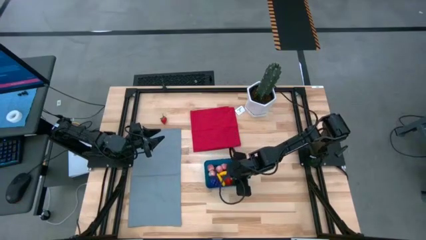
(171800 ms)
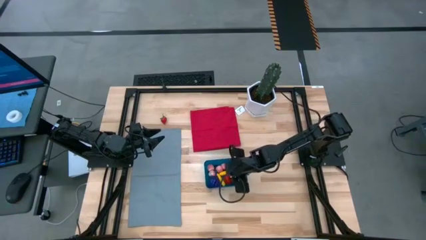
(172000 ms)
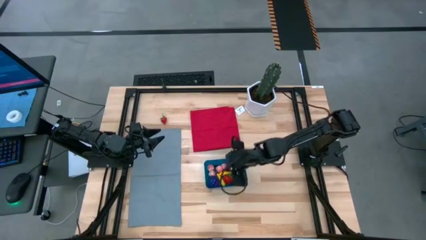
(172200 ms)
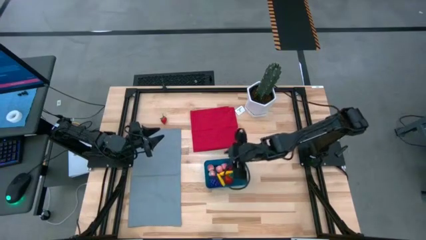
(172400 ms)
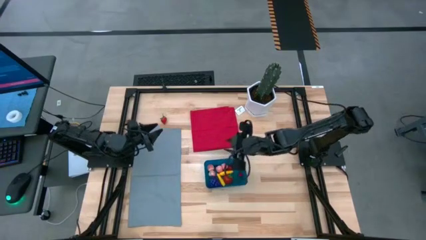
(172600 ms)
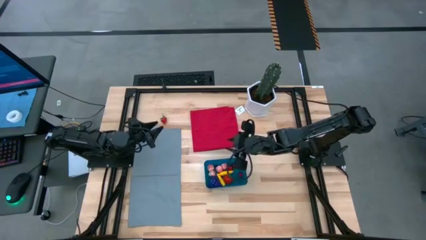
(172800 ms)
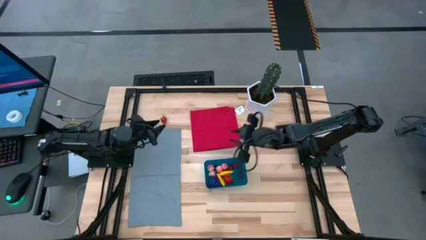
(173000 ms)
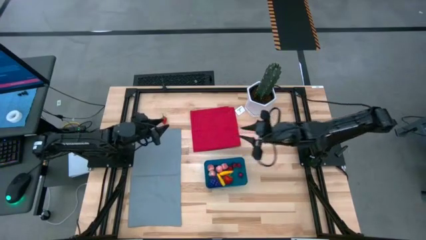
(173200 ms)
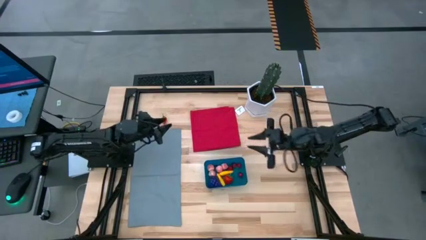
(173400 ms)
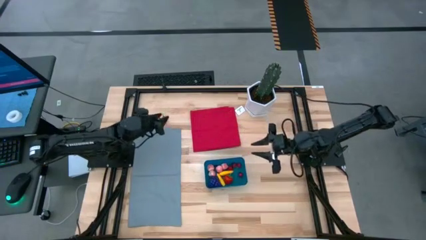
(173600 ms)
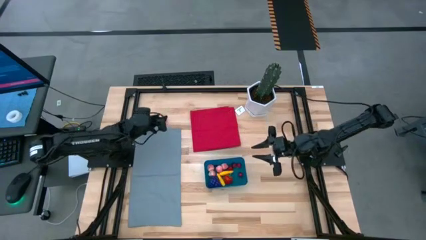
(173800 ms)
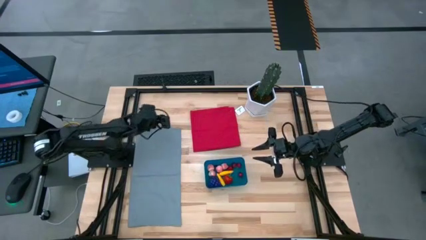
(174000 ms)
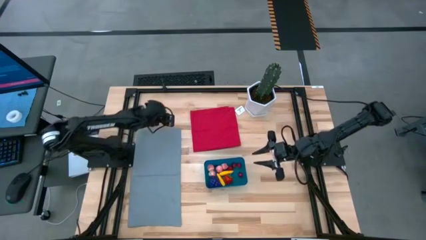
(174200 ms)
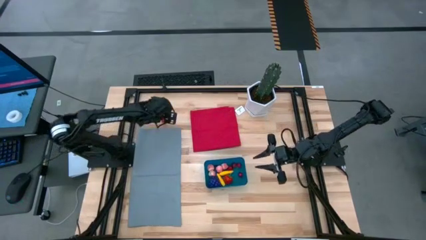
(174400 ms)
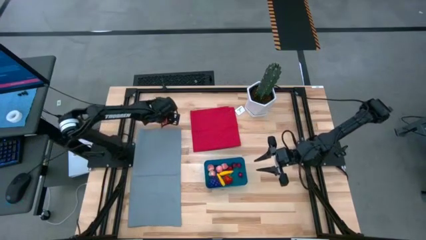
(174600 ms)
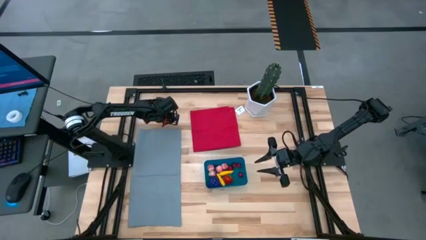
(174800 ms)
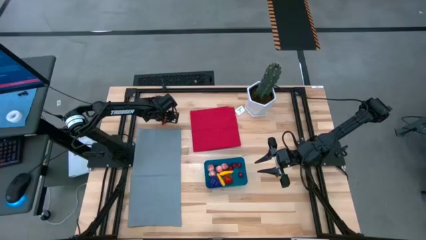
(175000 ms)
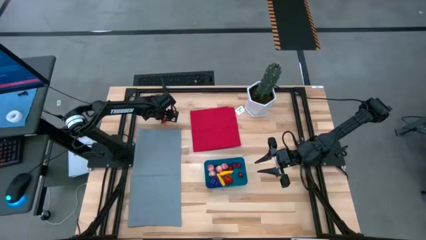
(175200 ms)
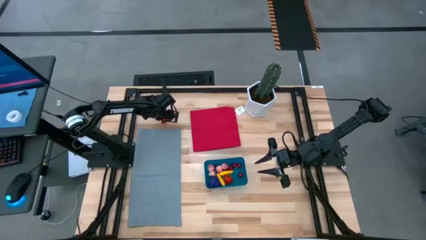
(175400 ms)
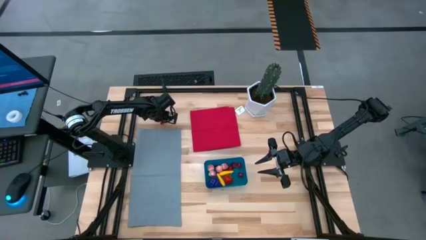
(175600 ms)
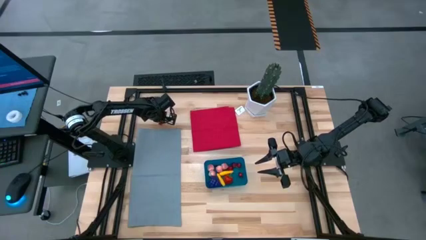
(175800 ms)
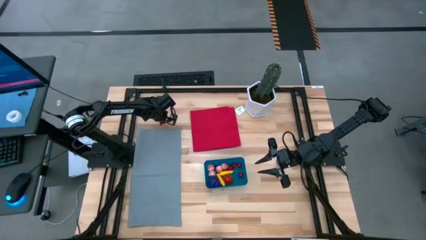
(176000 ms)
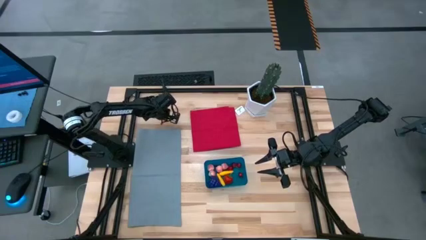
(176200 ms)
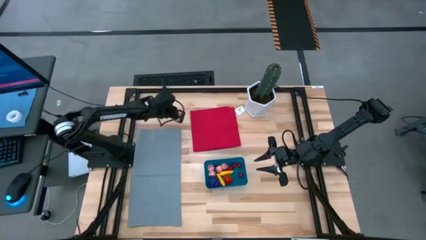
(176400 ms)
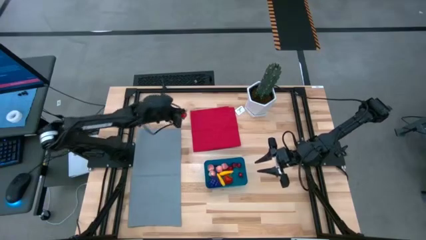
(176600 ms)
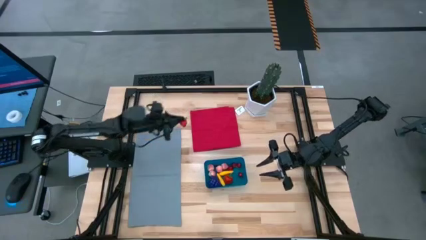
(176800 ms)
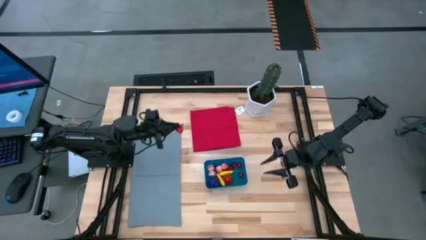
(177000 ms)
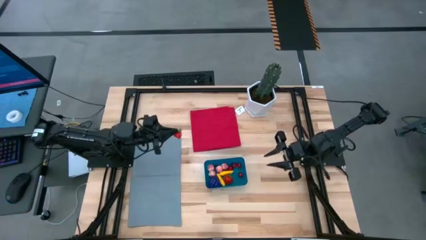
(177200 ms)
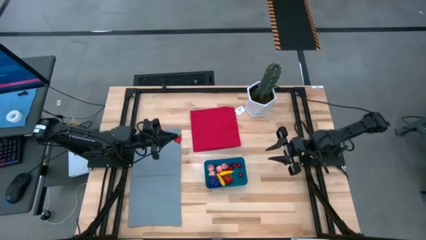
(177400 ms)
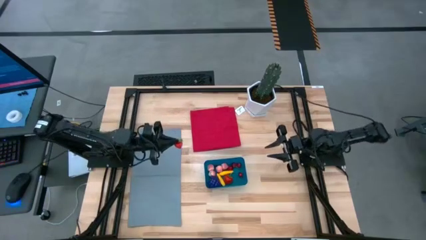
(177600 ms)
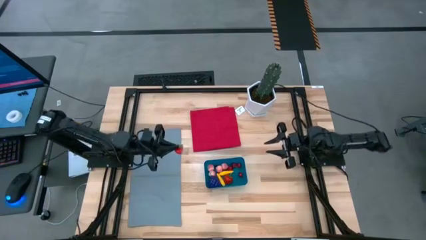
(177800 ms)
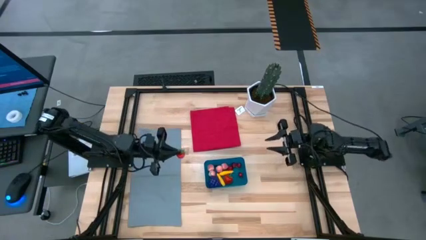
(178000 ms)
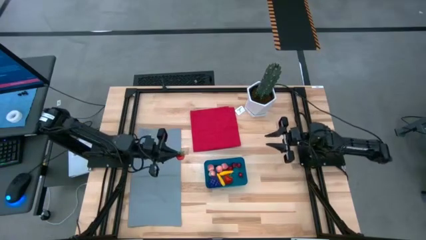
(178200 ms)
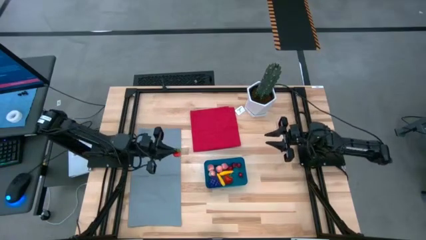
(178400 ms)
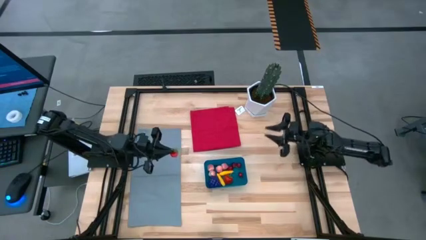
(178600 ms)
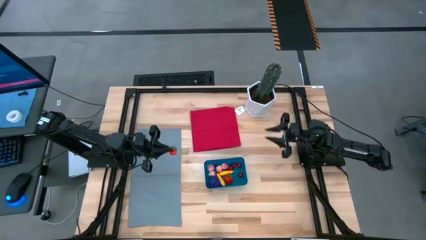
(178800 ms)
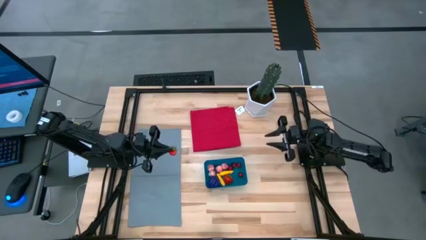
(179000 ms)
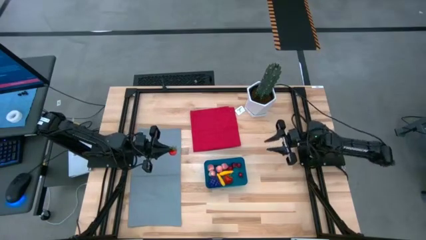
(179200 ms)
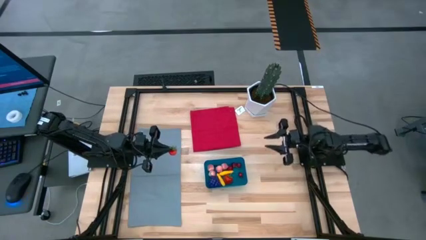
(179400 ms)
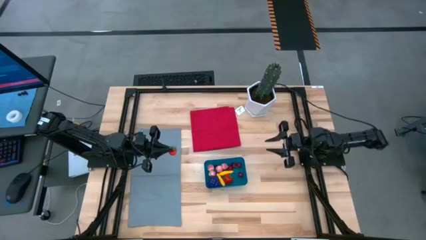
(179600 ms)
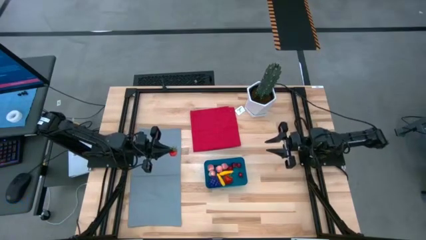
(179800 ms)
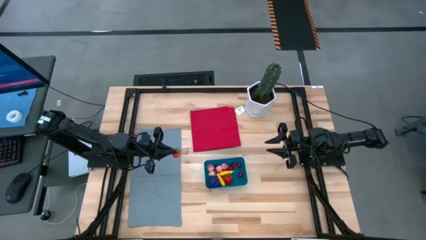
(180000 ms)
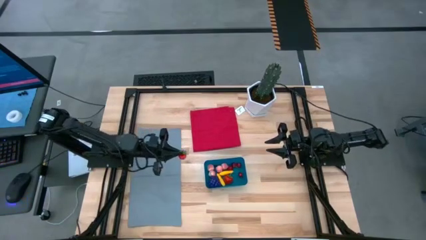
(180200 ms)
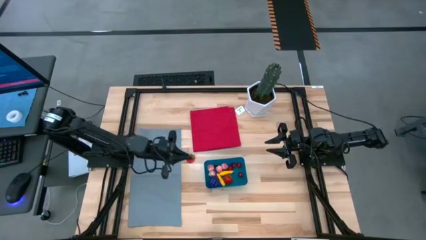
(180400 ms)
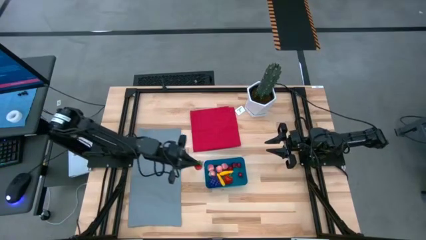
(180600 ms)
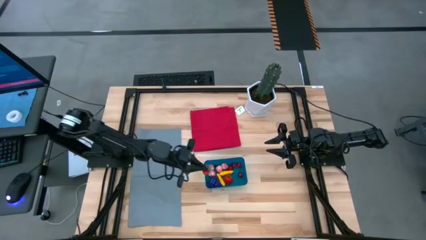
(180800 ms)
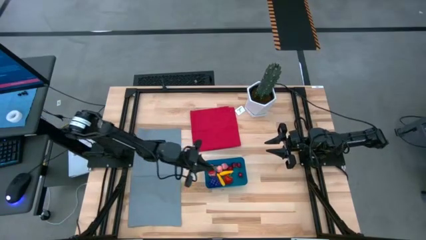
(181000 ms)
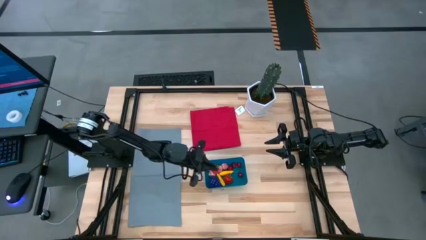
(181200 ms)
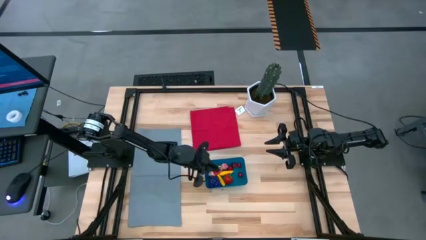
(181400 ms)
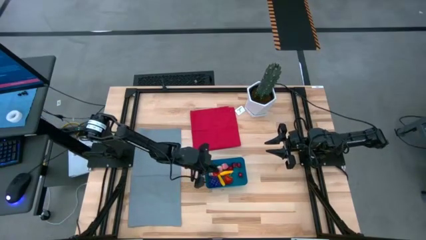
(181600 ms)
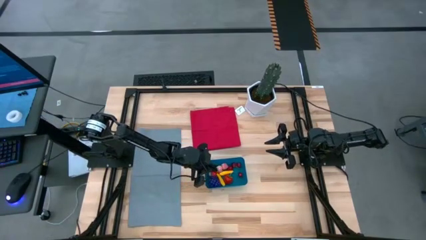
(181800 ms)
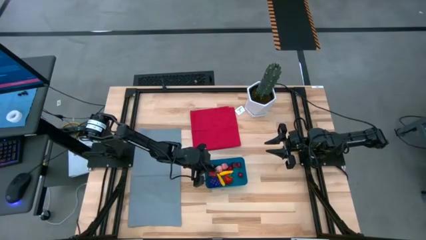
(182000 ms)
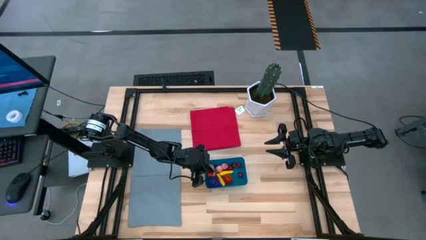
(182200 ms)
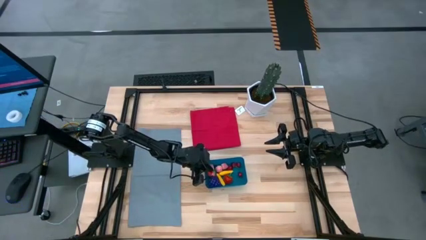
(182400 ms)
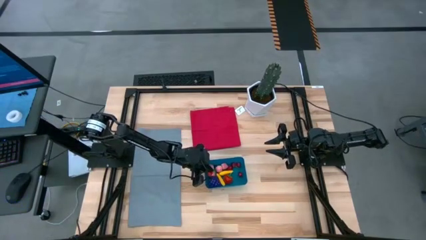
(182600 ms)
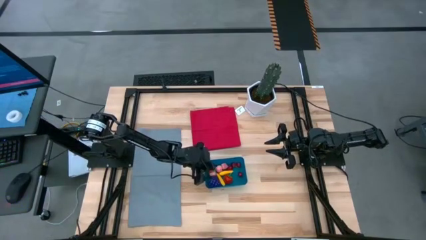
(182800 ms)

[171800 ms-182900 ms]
Task: Pick and placing Produce into tupperware
Put the strawberry into the blue bin

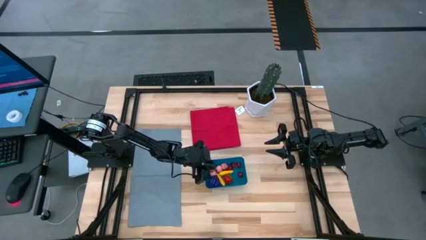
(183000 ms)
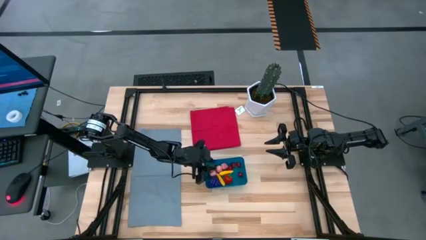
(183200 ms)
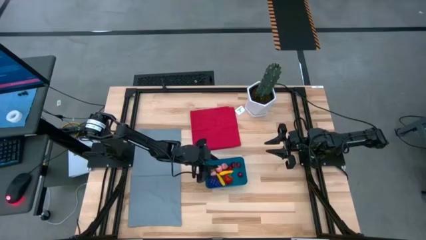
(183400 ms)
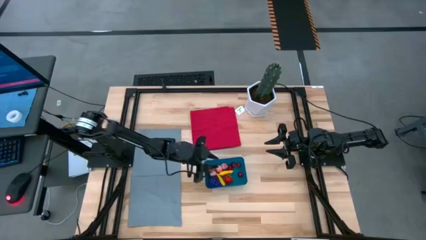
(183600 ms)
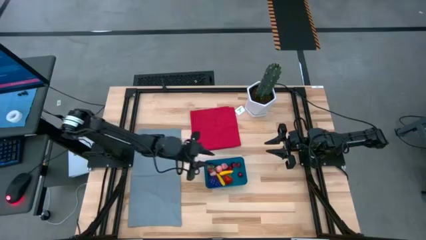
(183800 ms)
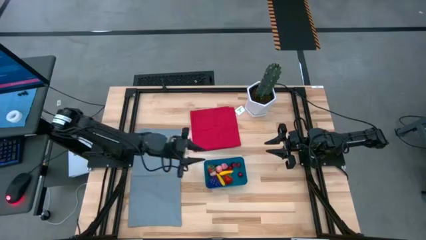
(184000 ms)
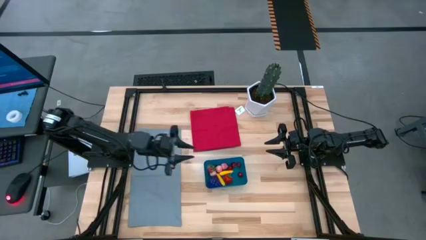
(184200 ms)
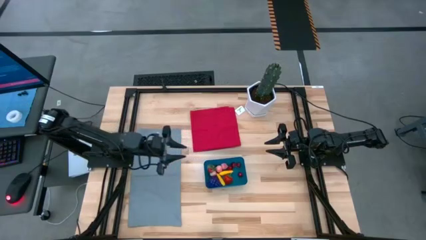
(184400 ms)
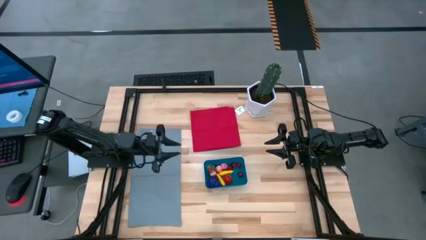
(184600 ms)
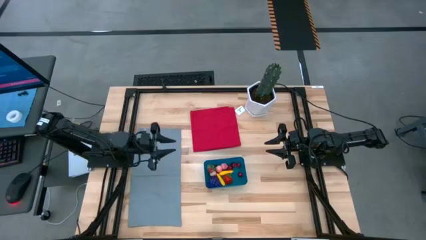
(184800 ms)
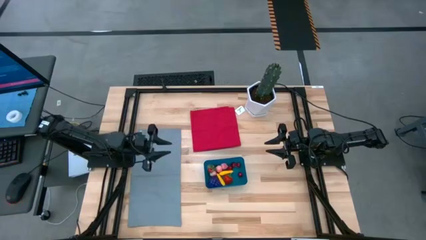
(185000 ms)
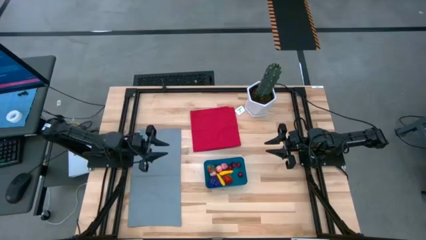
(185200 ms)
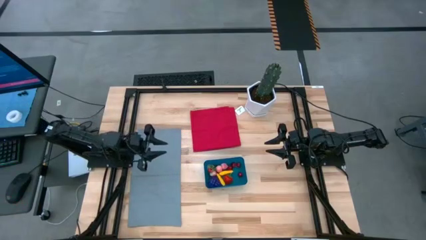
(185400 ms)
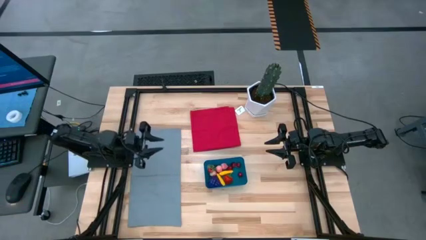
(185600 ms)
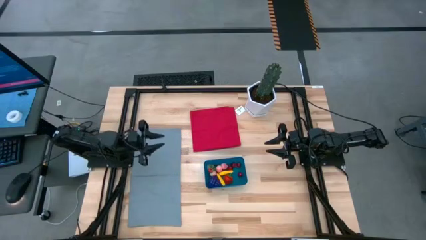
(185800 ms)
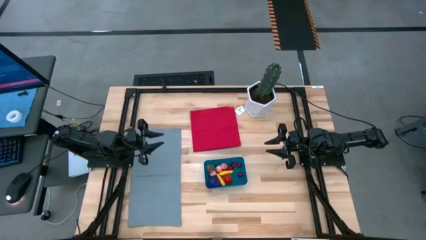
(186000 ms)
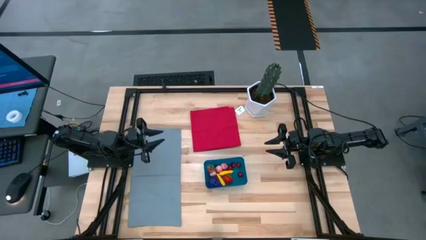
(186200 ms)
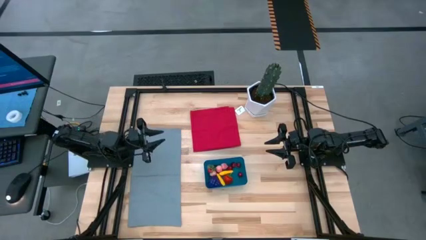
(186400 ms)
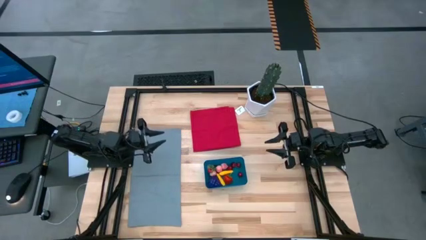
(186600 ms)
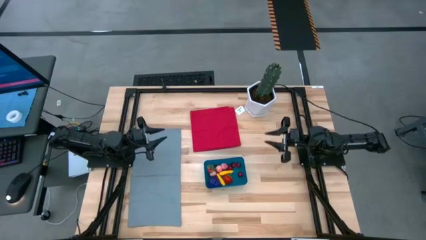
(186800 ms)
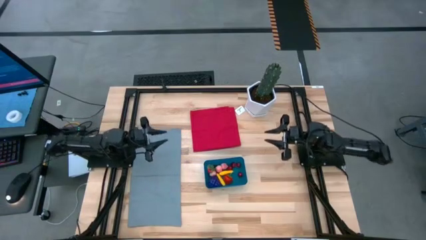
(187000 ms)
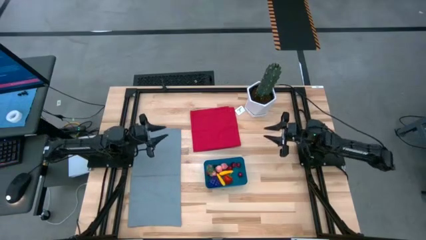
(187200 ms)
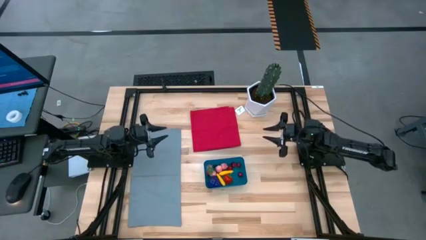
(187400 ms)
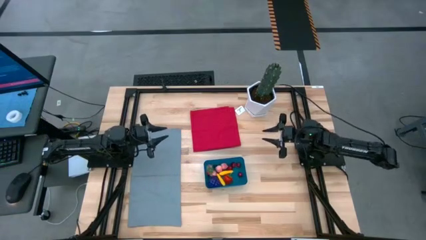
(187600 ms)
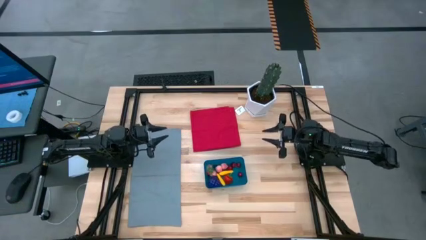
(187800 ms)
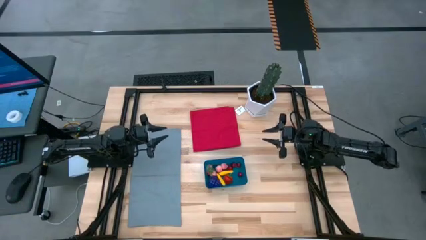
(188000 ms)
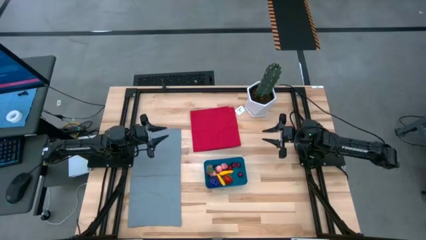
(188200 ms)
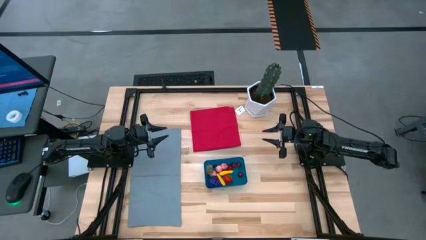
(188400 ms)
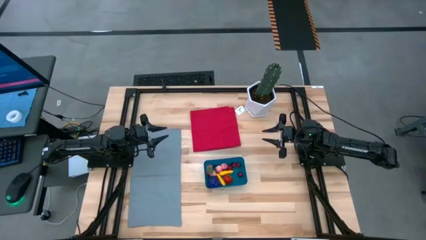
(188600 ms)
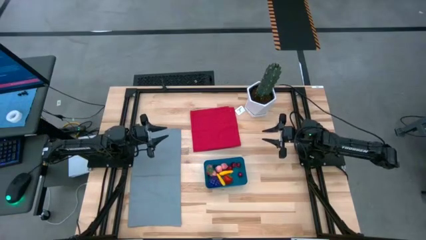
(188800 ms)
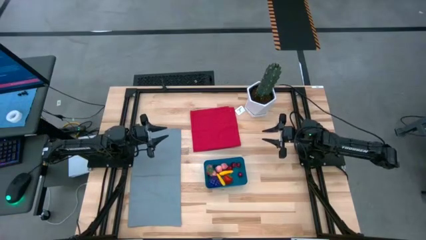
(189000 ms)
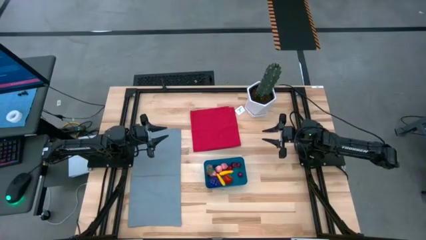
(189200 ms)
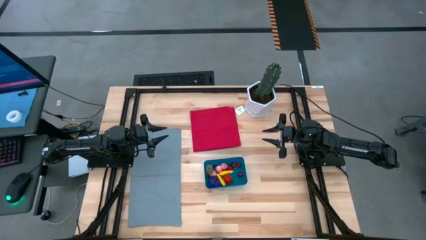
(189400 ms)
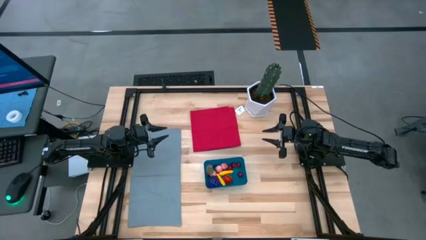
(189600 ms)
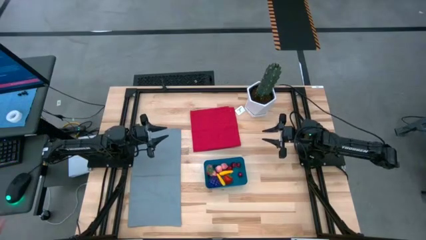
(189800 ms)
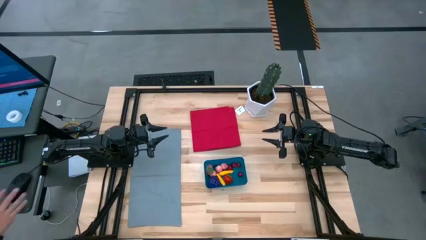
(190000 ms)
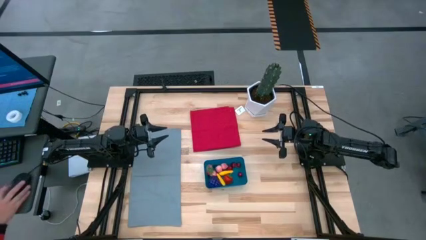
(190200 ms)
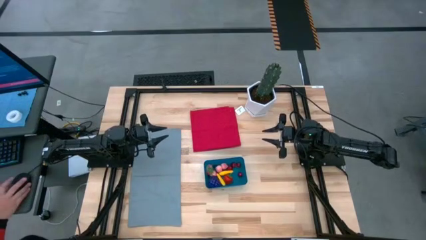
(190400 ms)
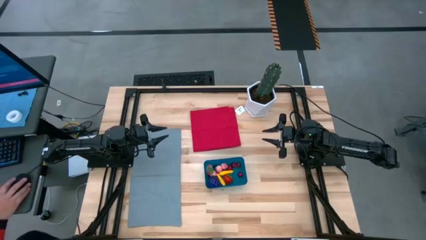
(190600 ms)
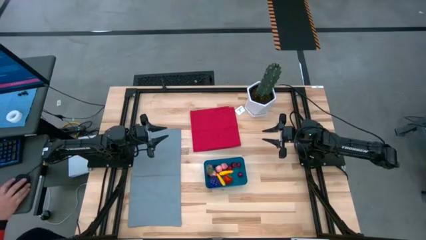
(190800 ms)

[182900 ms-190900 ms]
Return to Home Position
